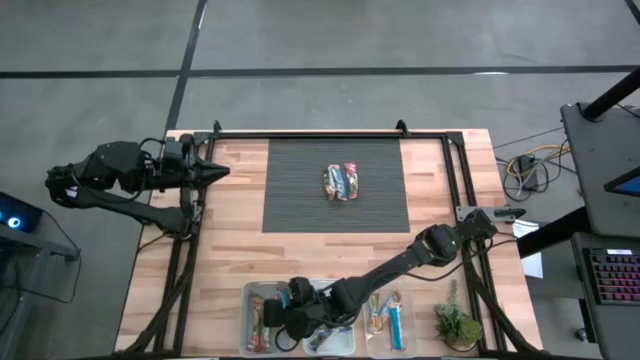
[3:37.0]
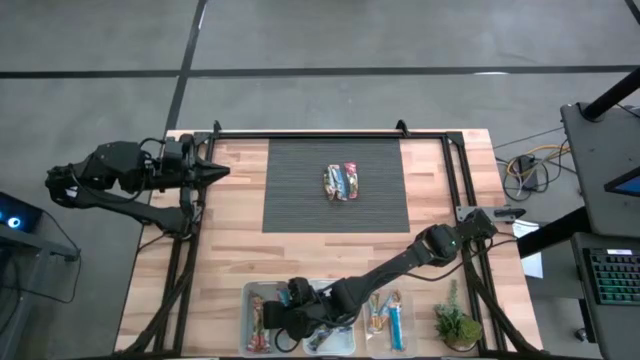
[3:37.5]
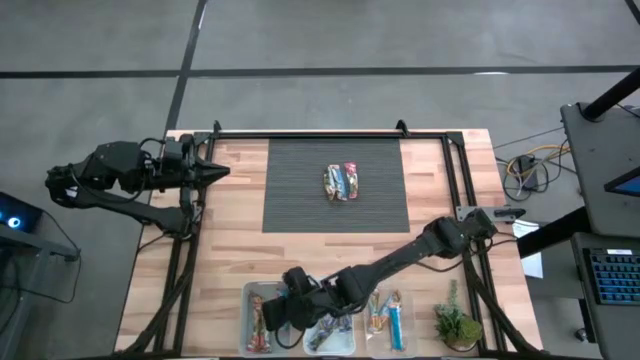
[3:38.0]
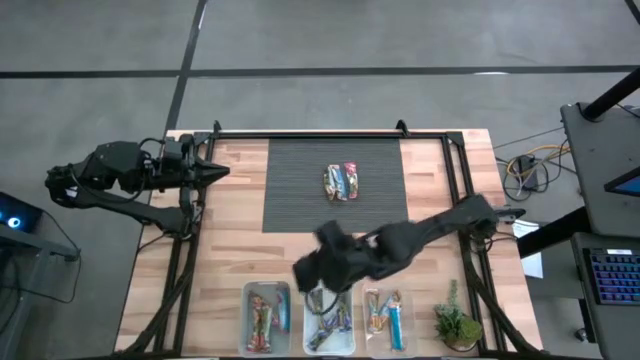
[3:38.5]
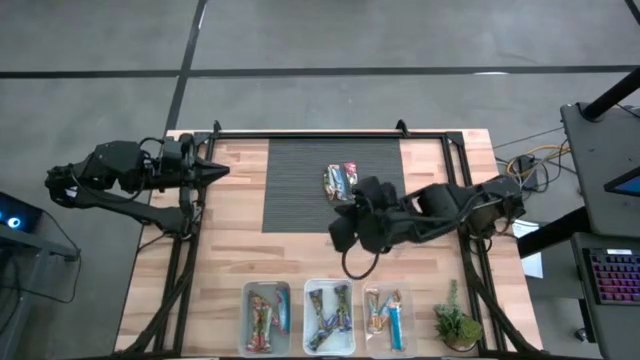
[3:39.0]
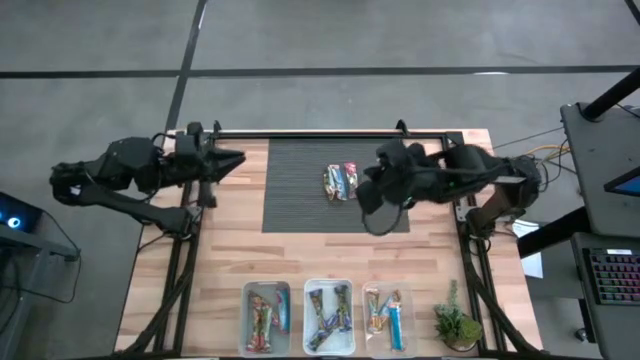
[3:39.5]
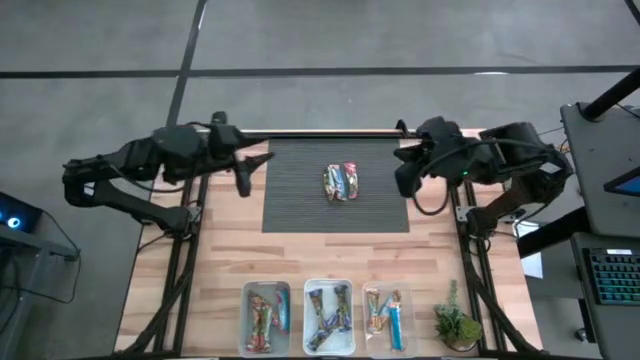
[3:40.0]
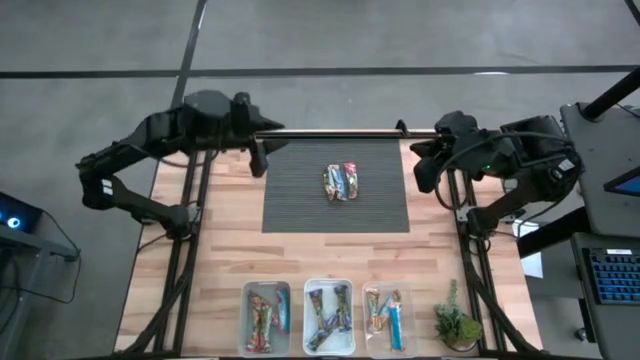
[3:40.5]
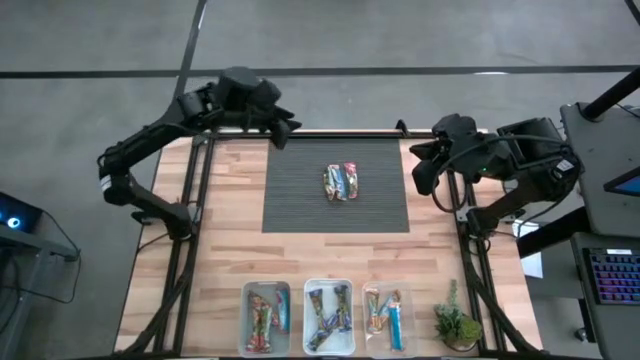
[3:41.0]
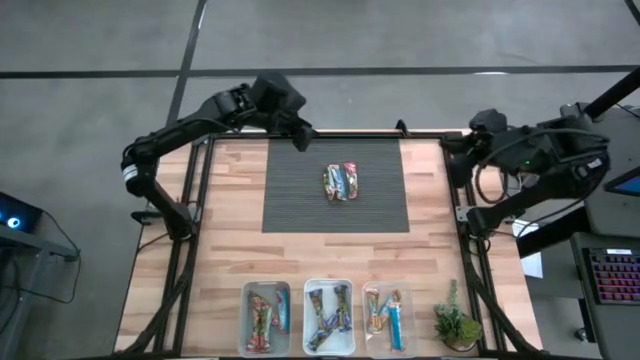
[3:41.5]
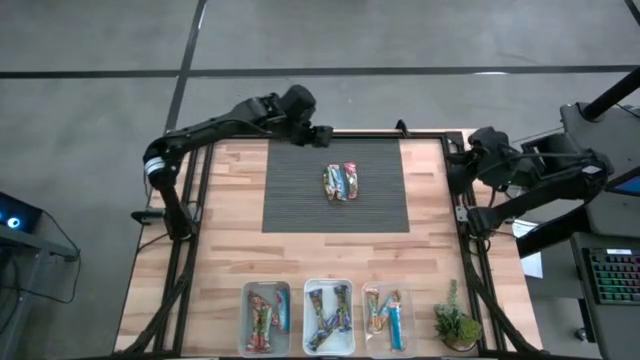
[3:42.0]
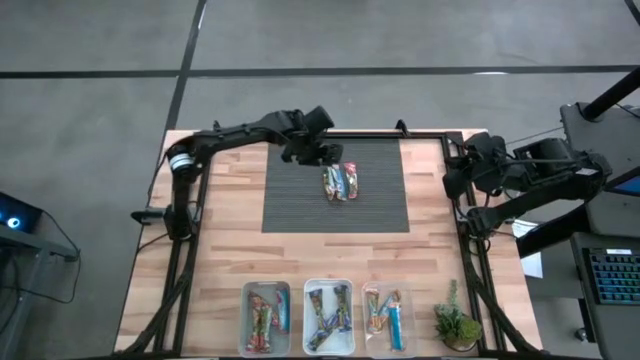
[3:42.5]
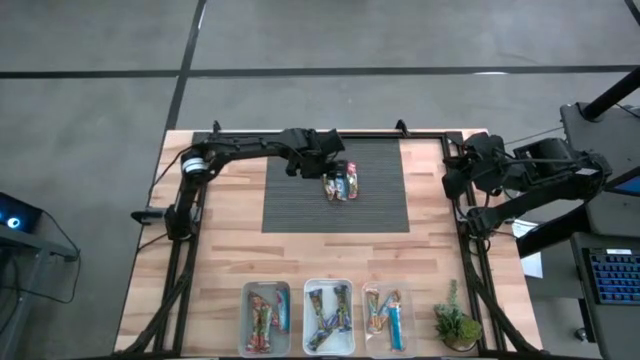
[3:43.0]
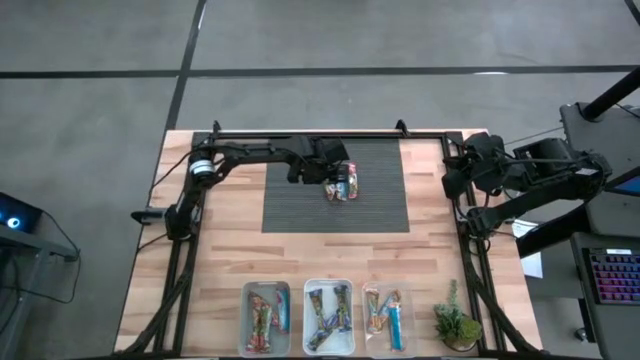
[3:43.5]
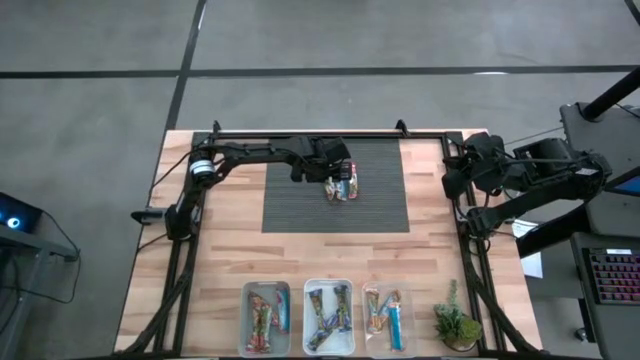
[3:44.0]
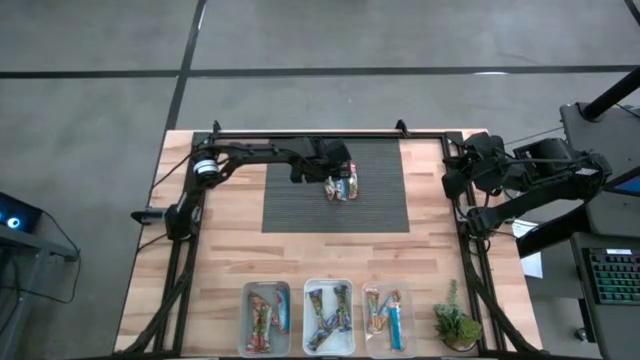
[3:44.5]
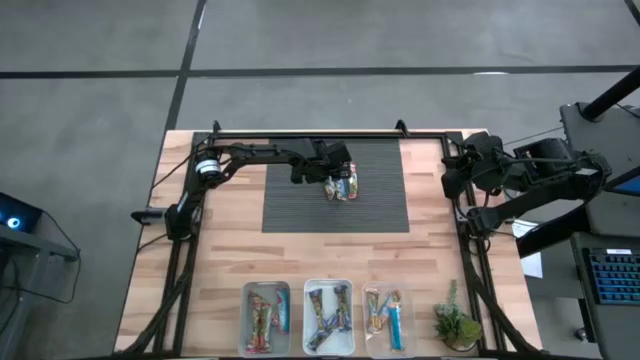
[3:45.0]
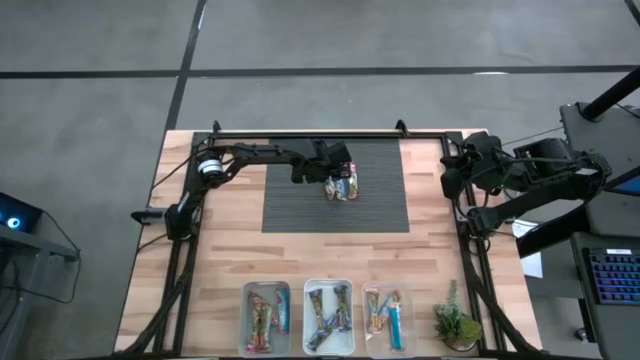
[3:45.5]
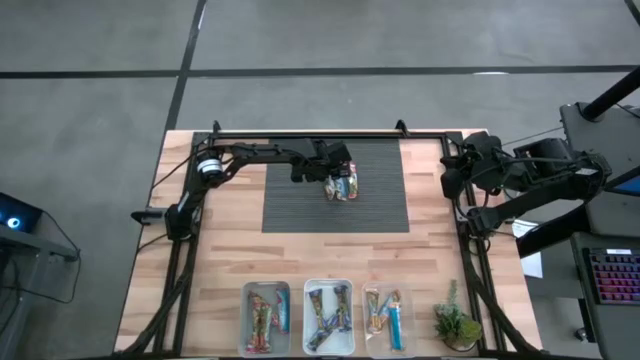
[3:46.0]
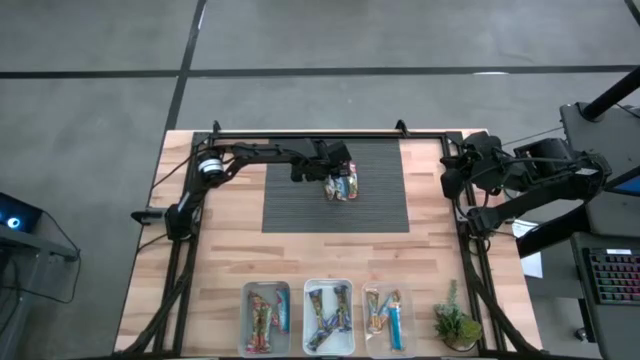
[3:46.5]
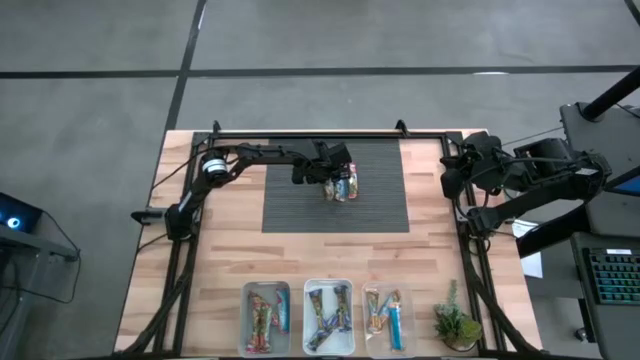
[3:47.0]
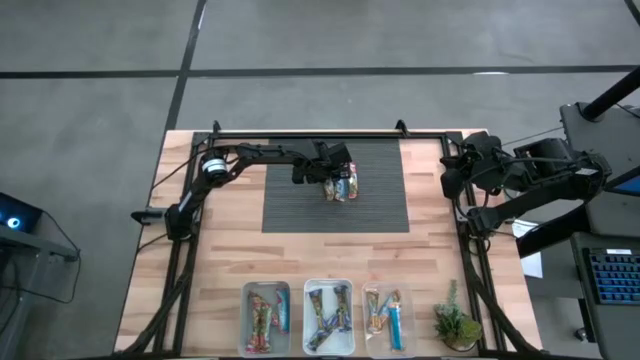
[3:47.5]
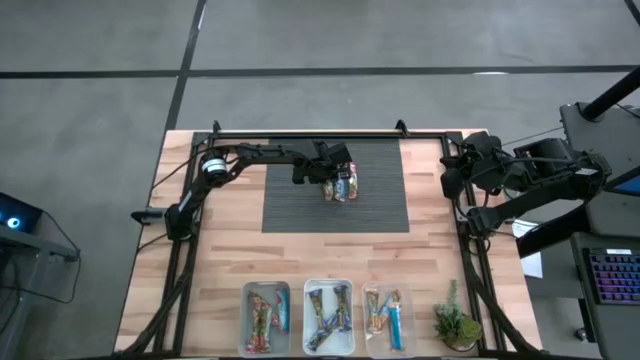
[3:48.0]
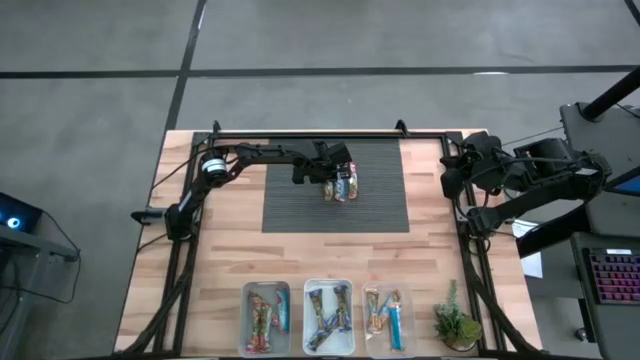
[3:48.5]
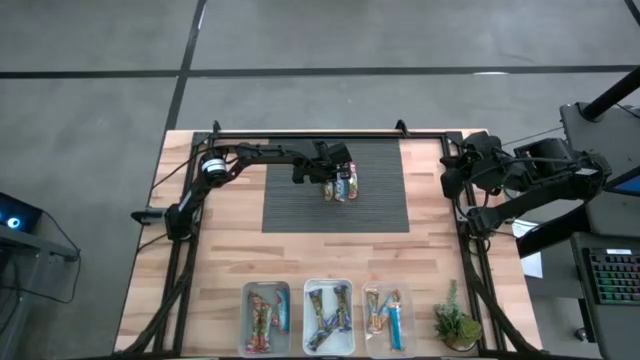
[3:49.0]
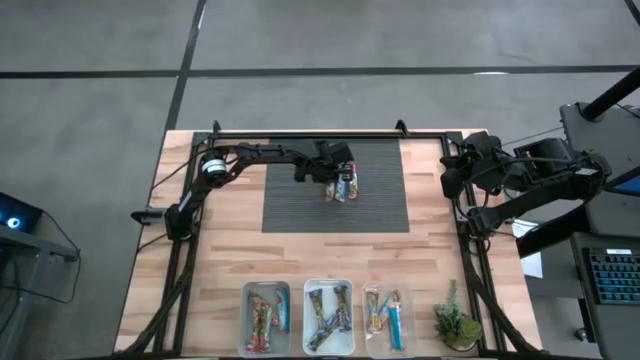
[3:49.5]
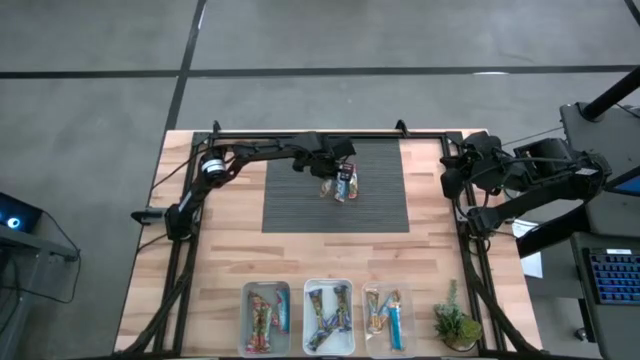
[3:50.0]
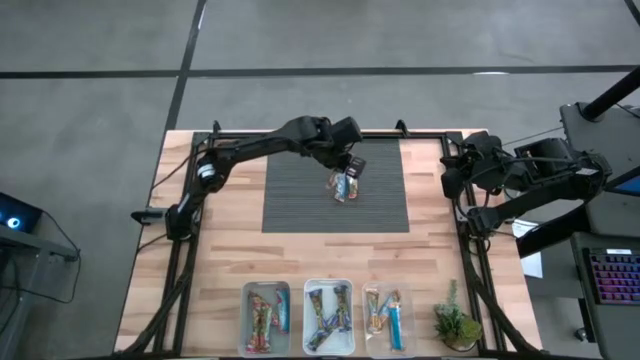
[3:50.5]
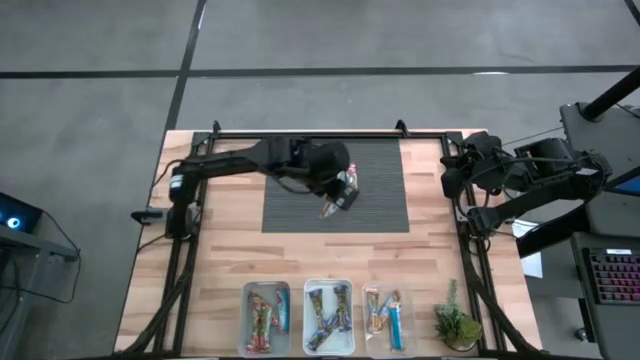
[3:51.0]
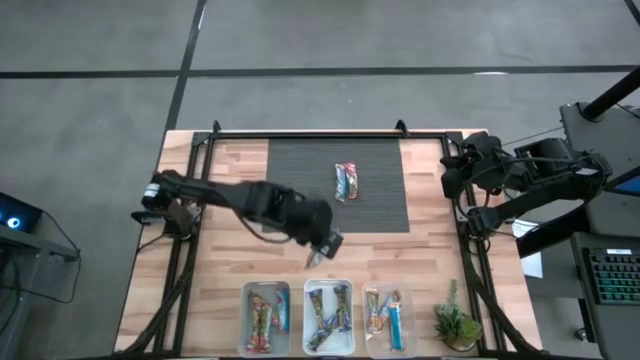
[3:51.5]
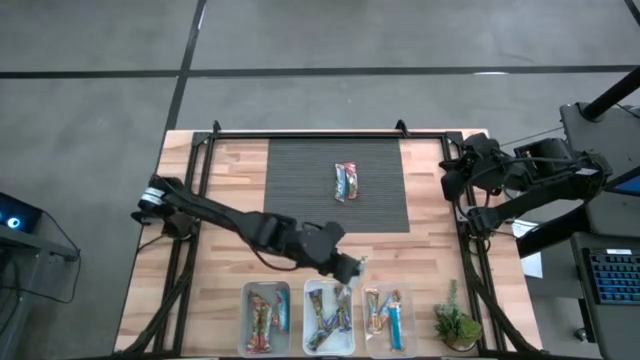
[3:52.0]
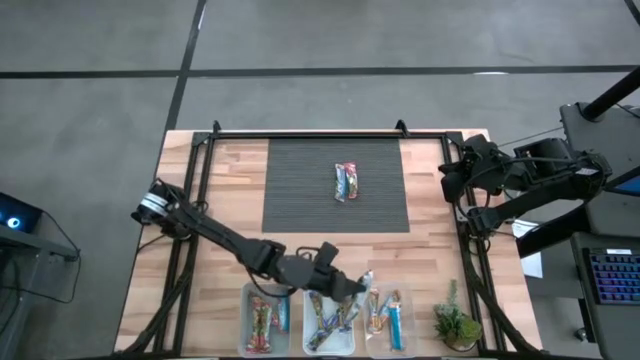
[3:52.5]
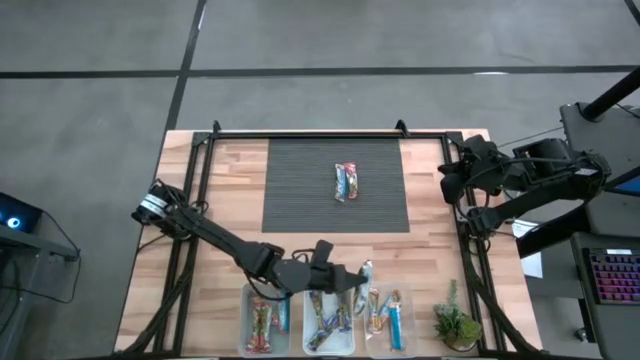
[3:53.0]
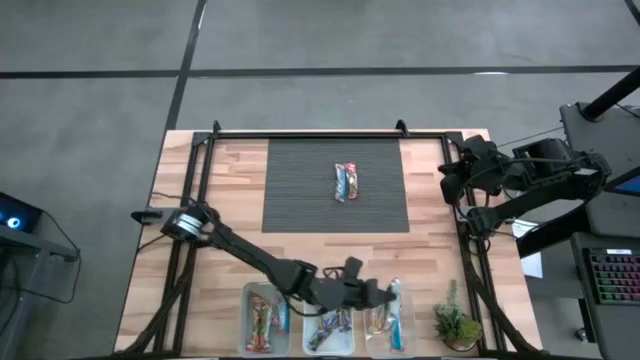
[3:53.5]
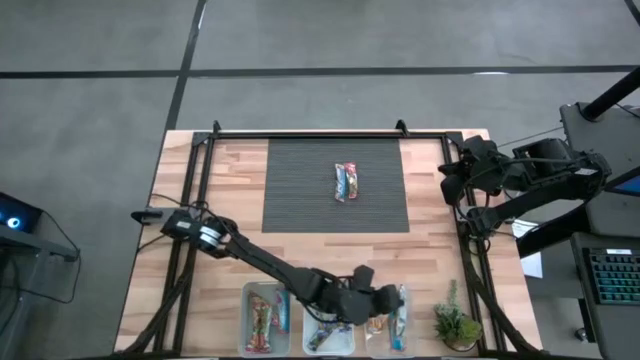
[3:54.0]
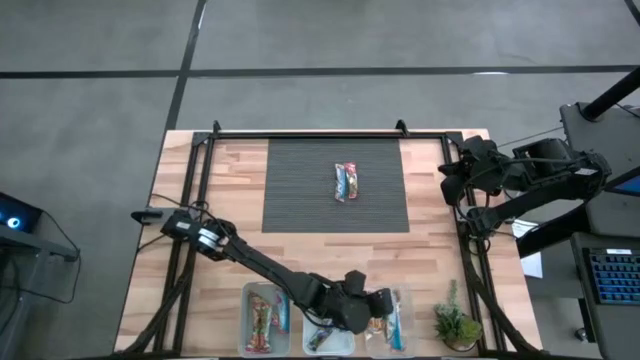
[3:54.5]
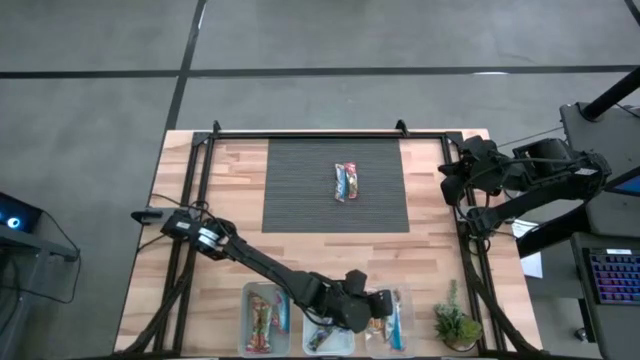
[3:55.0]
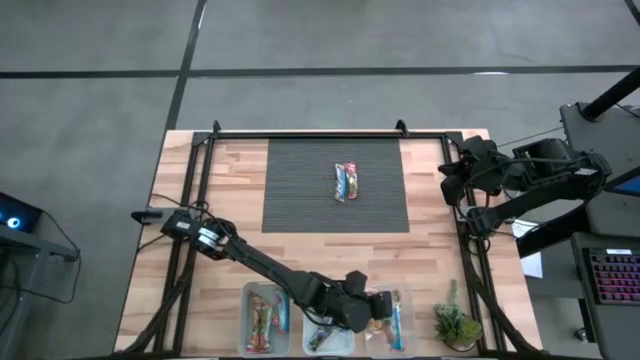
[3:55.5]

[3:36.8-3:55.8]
Task: Pick and place Granola Bars by type
Put the left yellow granola bar into the transparent bin

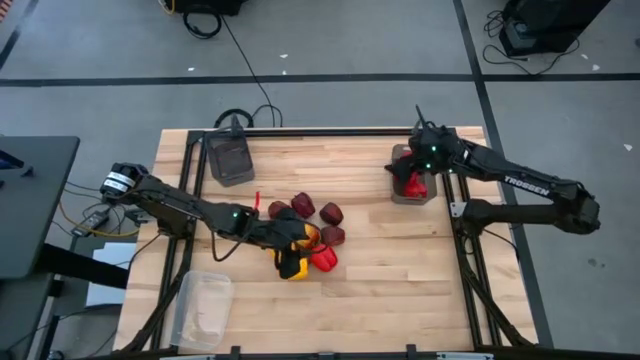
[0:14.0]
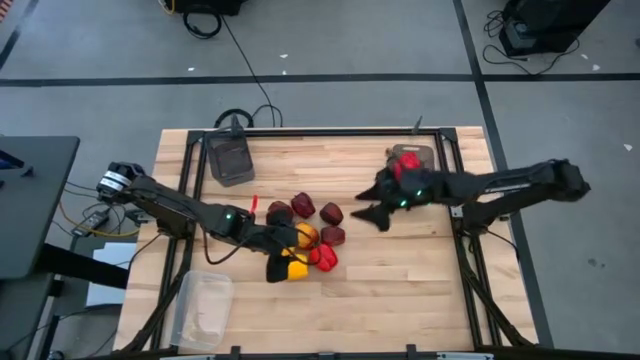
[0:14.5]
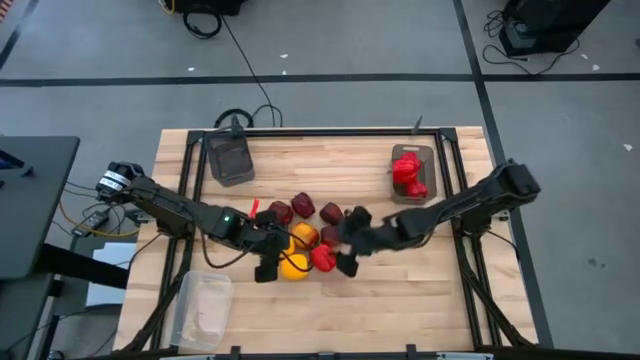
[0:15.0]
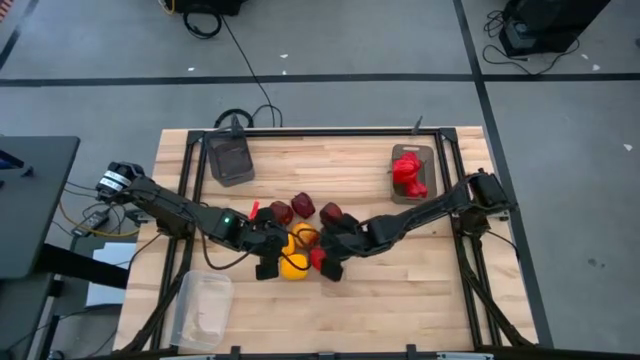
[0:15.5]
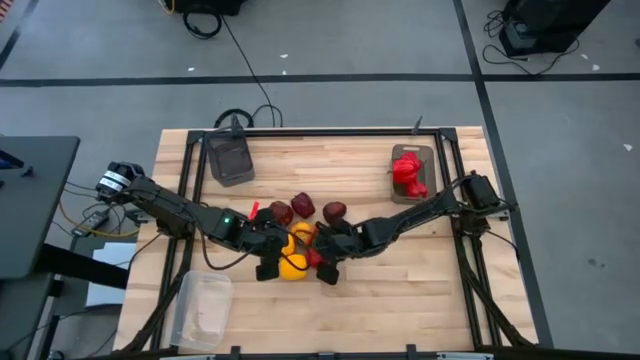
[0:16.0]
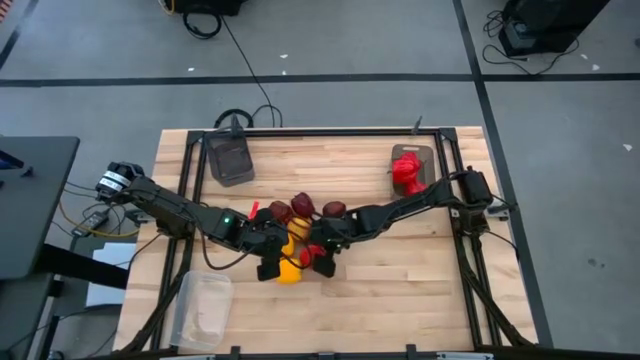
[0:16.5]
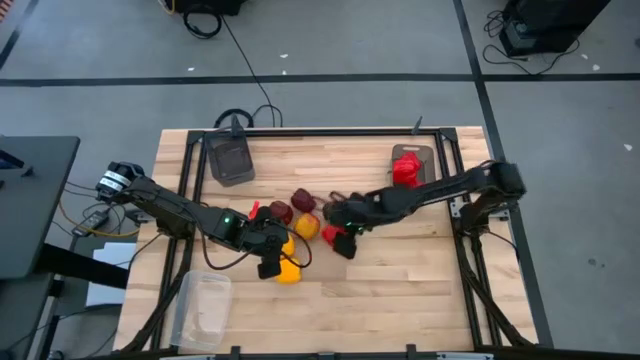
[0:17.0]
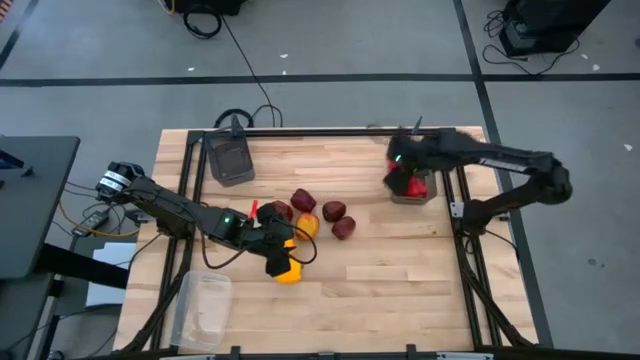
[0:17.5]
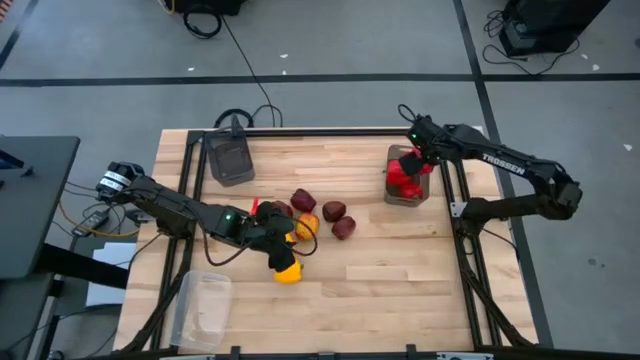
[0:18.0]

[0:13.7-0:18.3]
Task: Sort produce into baskets
Put the red bell pepper into the right black bin
